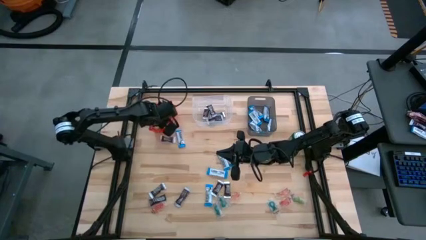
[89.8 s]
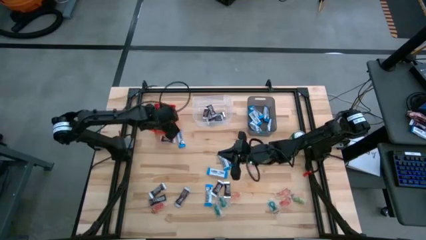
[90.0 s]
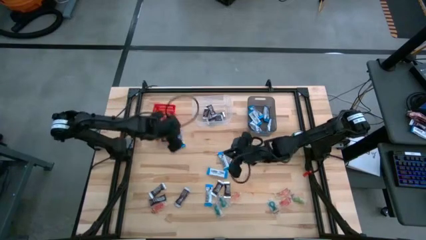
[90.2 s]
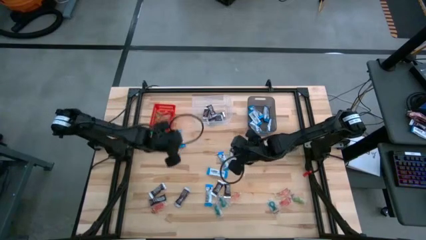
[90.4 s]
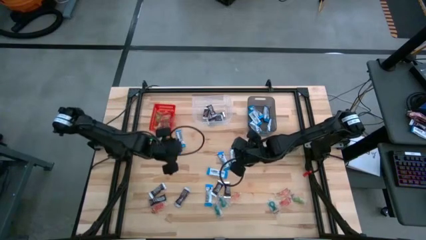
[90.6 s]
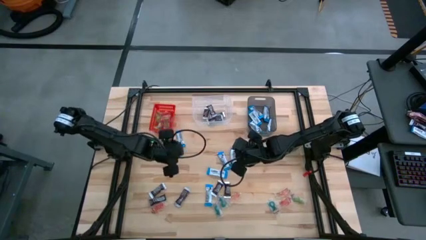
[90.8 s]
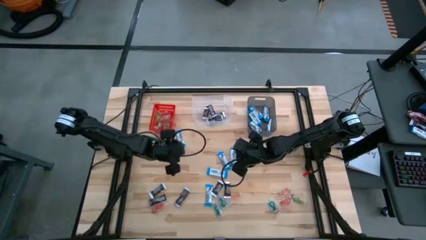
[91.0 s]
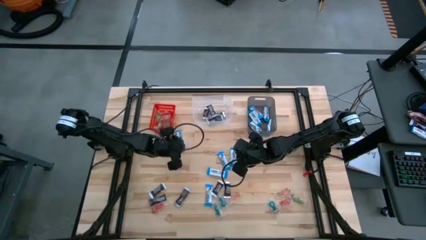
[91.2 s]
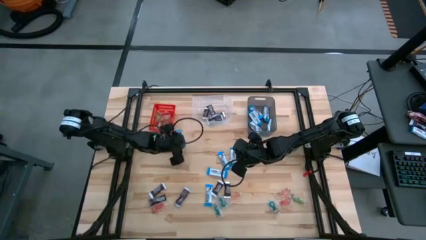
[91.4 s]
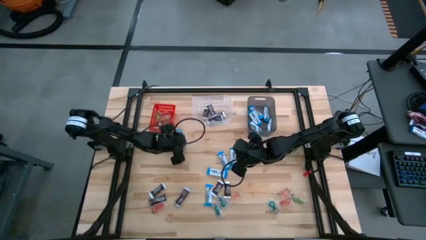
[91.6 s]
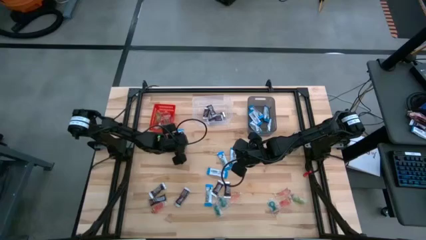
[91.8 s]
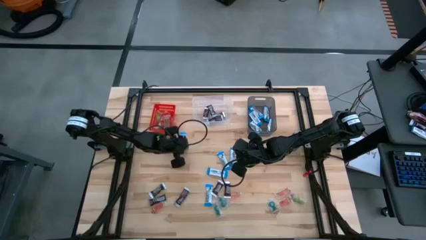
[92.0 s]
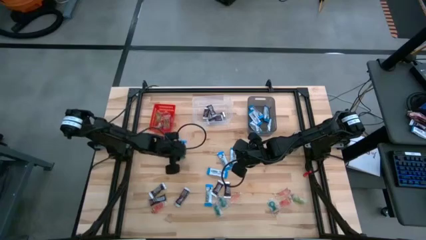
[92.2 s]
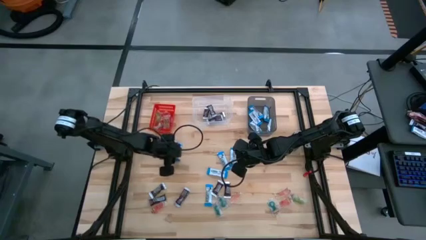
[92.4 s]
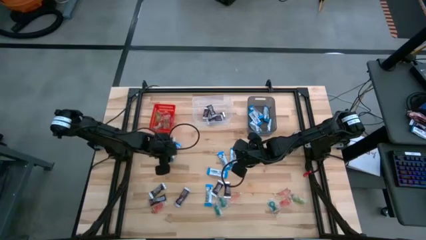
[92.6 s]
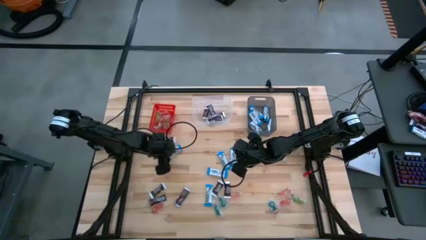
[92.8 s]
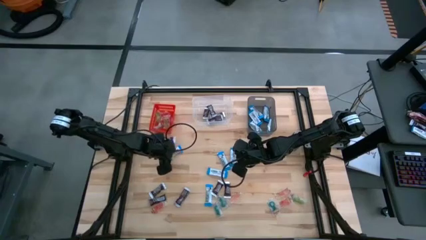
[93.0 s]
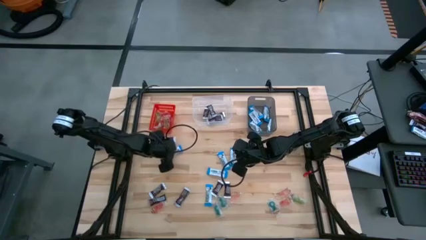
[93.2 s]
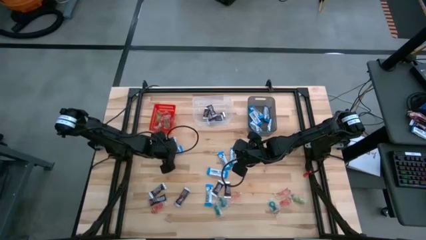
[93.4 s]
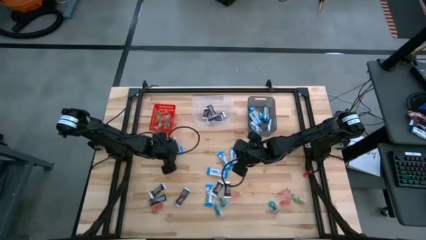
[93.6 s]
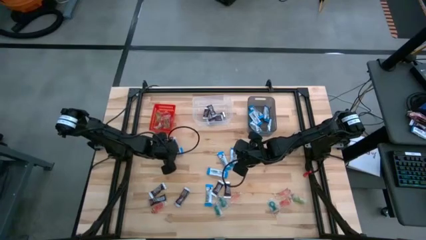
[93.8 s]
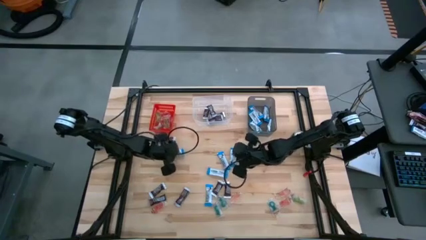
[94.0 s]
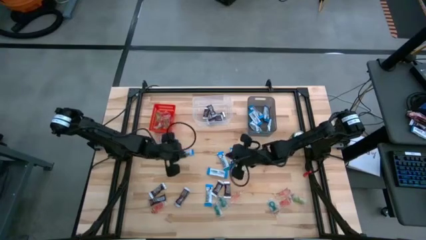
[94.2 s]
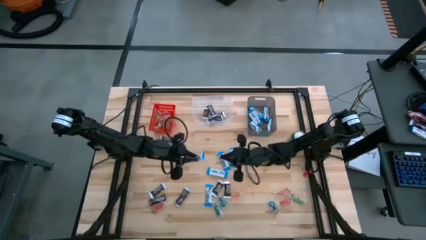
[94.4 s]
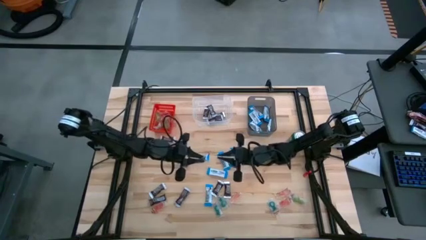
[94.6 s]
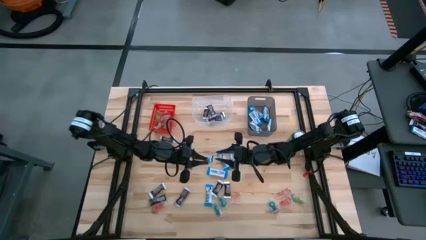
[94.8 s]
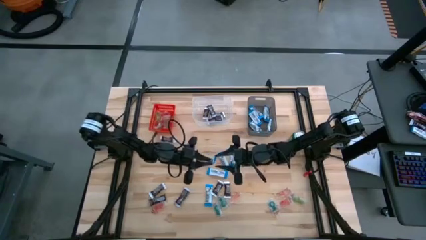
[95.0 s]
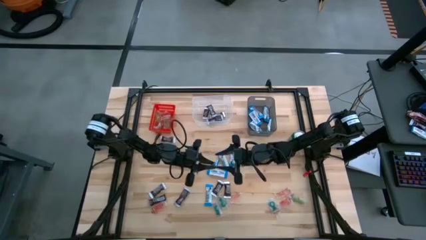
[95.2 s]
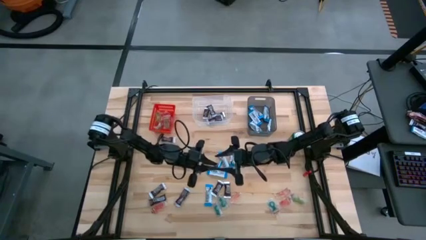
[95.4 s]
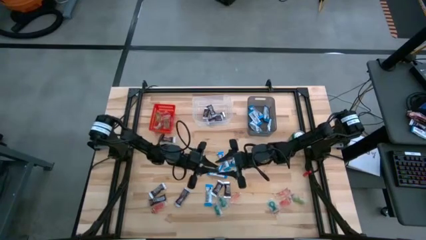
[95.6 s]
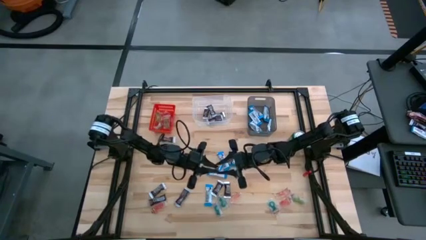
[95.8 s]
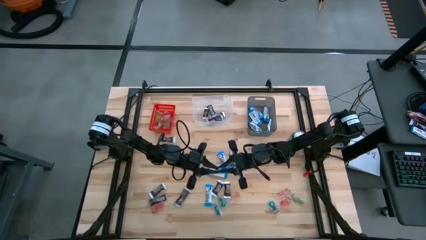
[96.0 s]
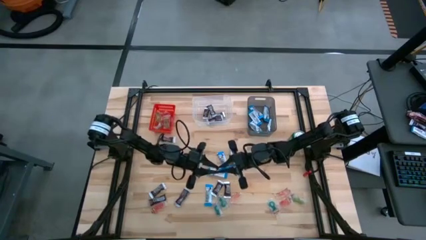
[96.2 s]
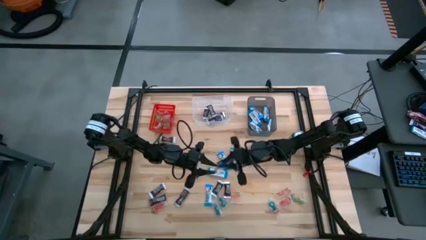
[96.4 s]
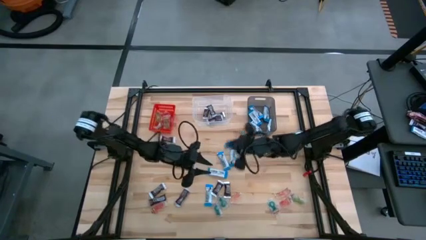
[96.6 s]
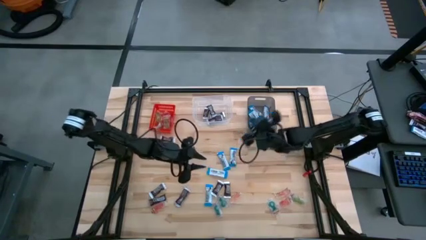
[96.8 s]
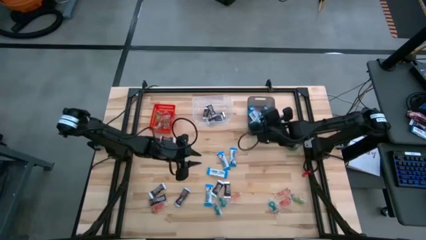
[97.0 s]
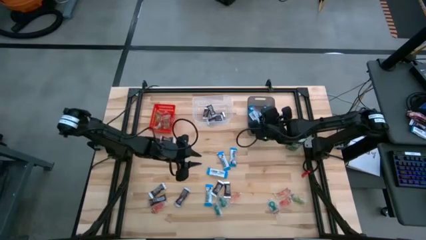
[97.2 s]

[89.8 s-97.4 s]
Task: Sort candy
Put the white chocolate bar into the black bin

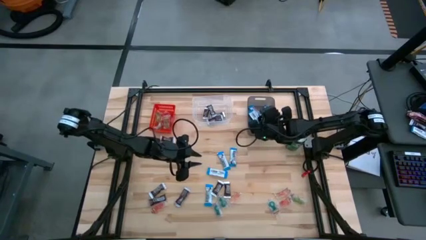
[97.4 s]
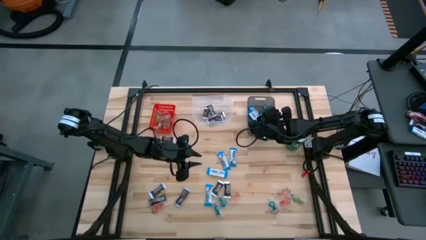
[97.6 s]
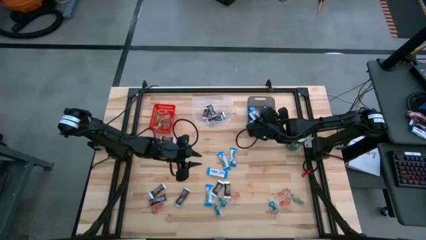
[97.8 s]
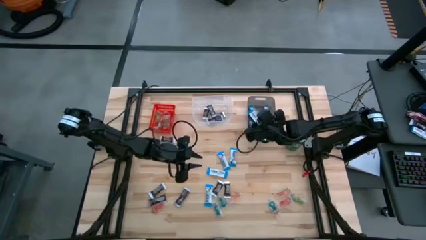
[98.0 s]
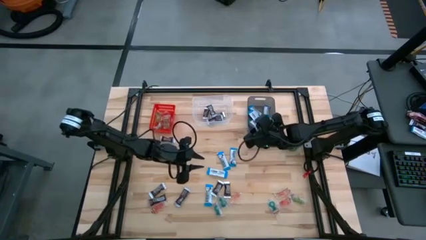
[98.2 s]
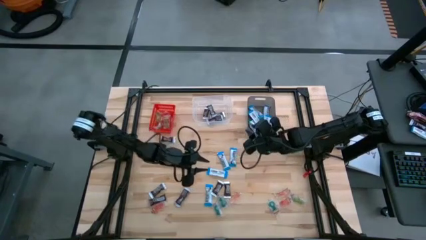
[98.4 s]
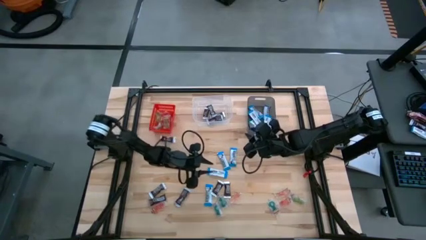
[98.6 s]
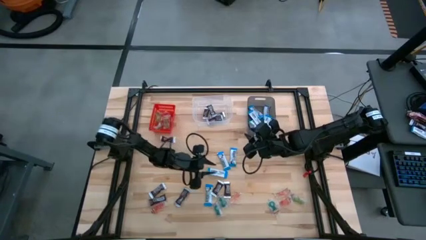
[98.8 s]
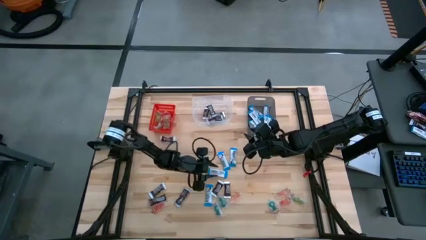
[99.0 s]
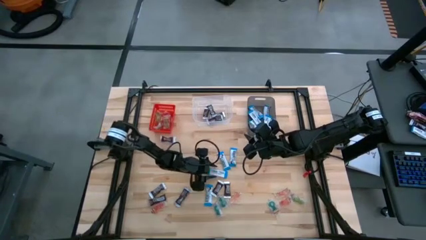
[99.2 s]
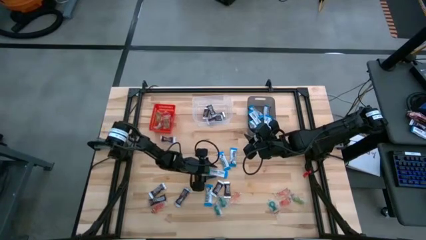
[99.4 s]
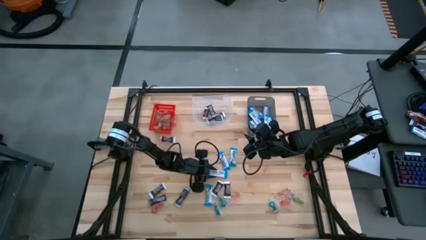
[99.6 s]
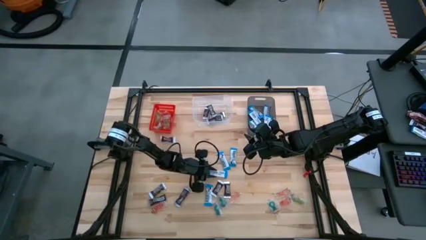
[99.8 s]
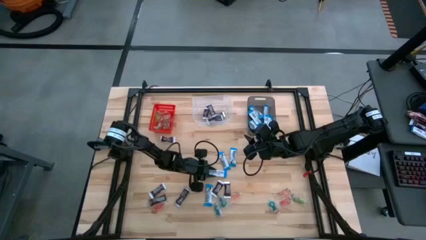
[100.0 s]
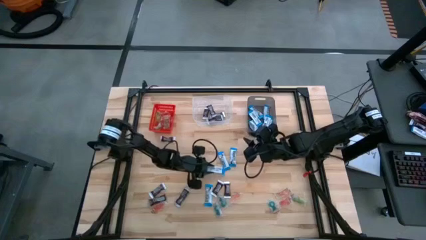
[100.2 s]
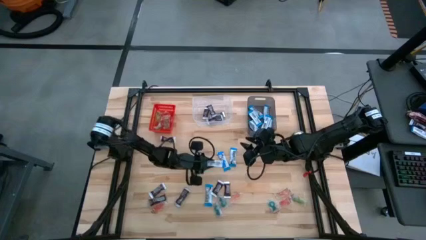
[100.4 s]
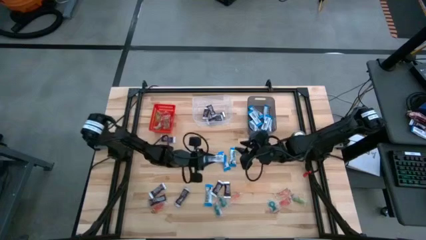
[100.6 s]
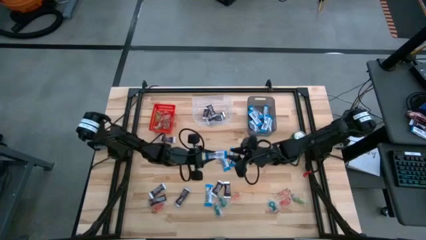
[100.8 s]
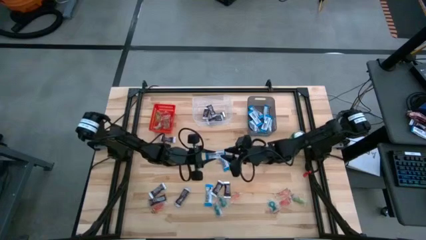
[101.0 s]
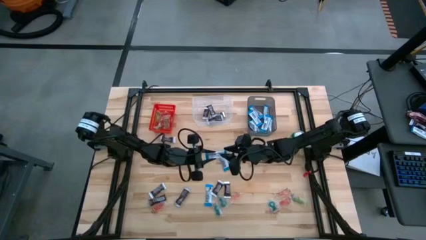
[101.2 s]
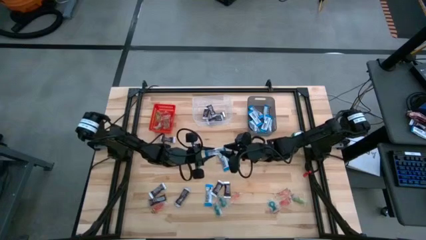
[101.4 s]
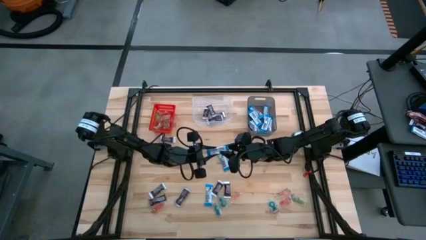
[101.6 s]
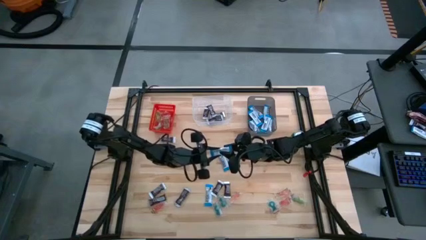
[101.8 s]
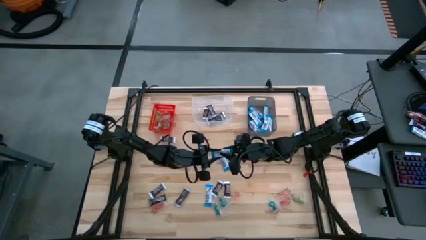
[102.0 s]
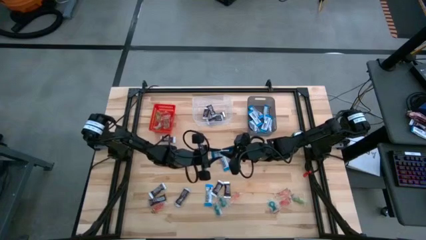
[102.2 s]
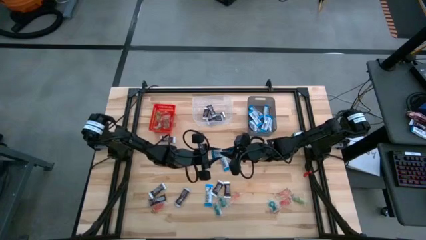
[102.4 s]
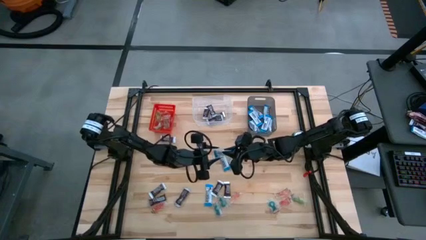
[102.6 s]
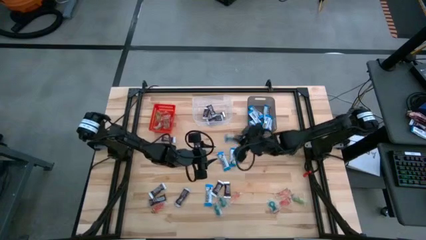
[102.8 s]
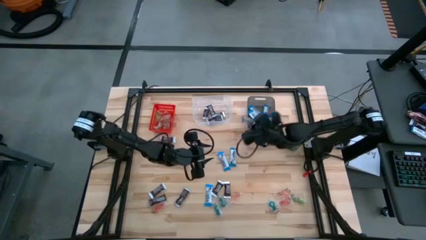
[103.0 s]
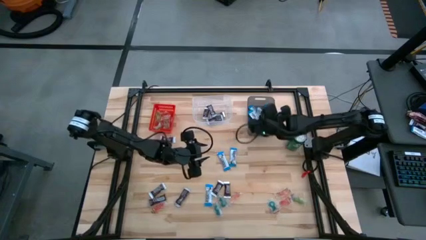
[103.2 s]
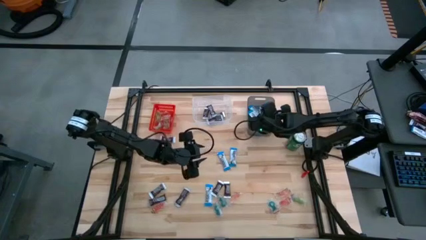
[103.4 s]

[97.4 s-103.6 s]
Put the white chocolate bar into the black bin

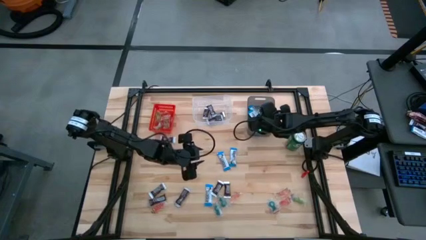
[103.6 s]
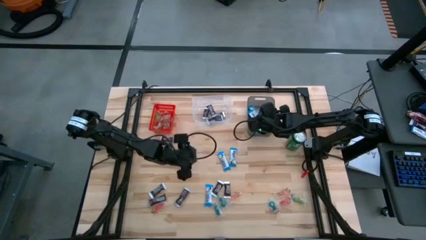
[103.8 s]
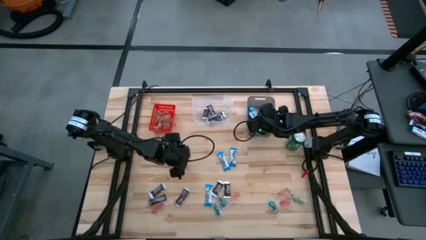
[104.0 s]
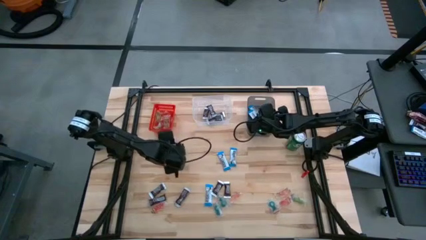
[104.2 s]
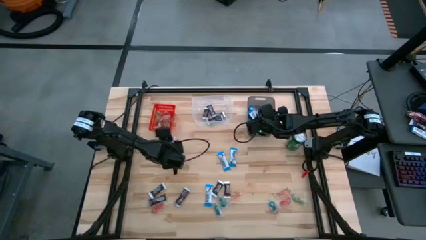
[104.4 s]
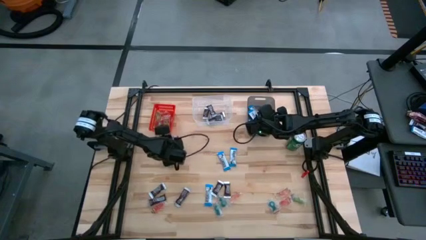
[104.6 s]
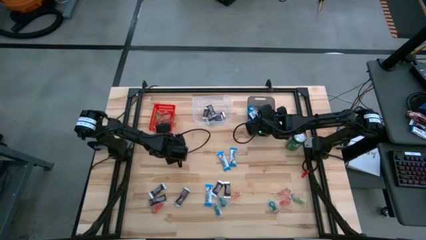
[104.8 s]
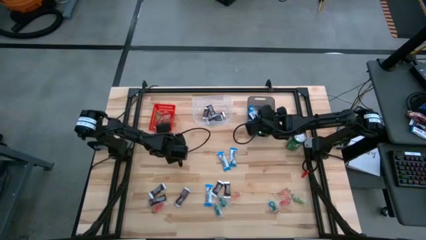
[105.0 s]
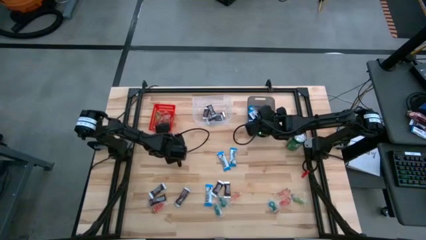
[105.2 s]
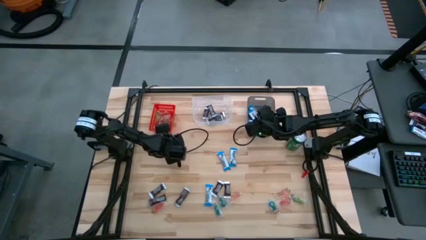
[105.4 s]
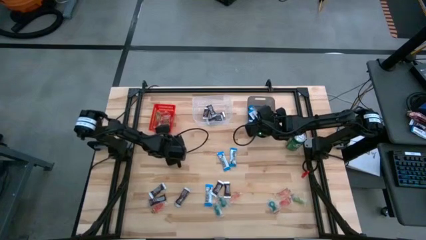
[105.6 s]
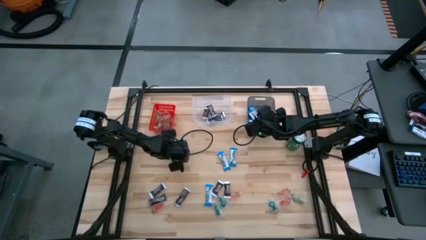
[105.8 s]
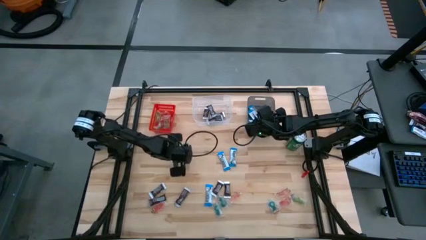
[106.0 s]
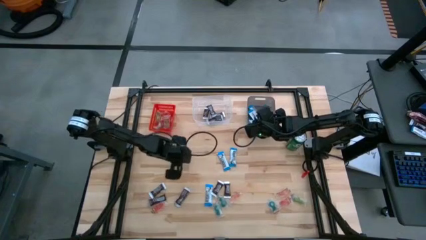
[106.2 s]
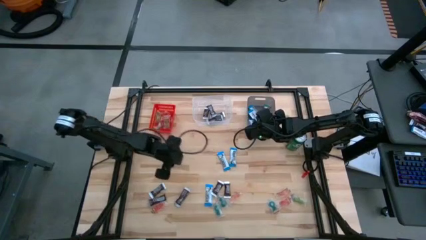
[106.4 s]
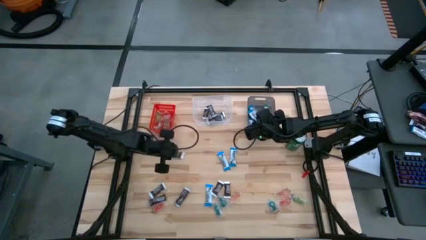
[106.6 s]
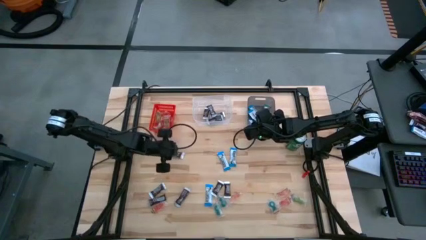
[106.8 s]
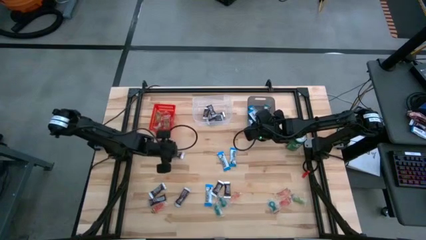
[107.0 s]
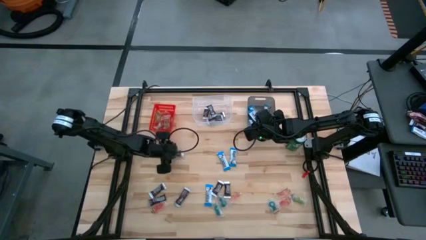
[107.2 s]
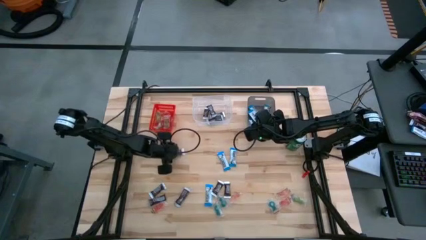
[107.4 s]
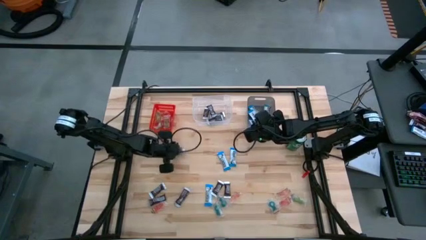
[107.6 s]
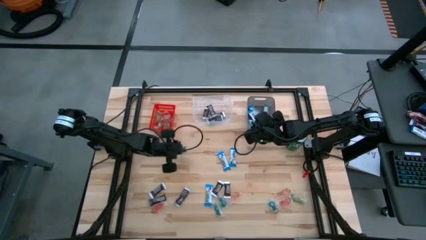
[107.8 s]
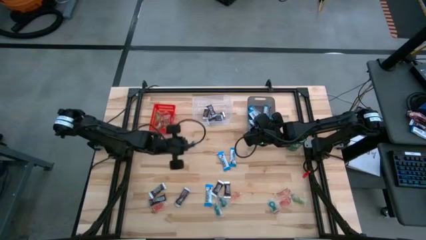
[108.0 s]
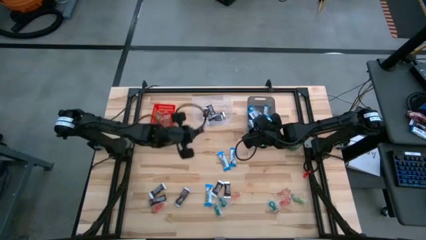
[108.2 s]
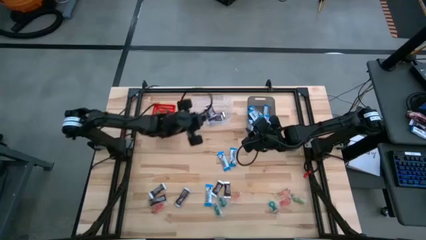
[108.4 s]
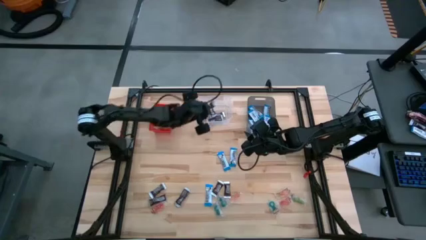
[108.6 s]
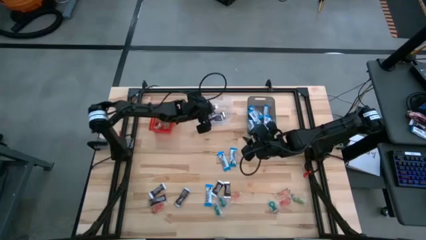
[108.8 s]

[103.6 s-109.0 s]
Put the black chocolate bar into the transparent bin
